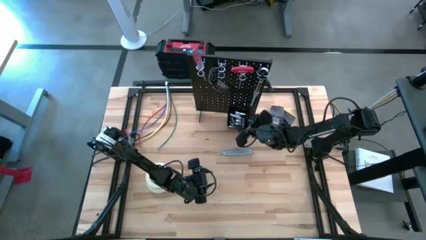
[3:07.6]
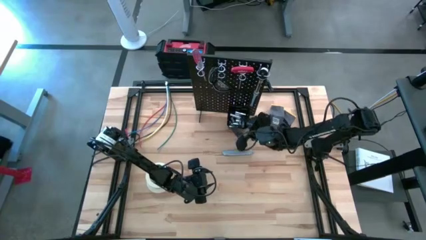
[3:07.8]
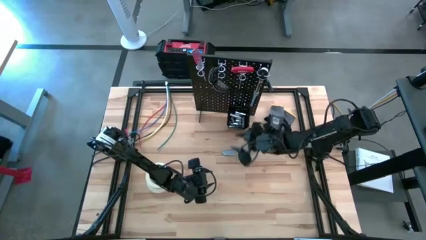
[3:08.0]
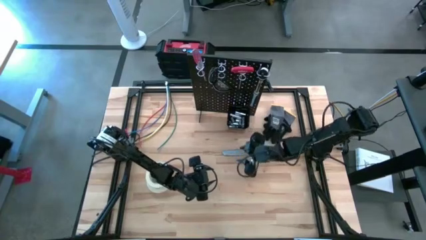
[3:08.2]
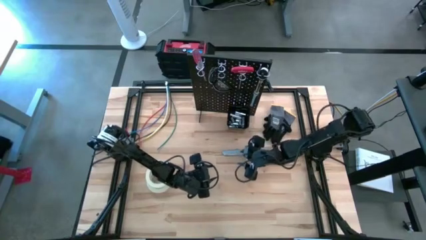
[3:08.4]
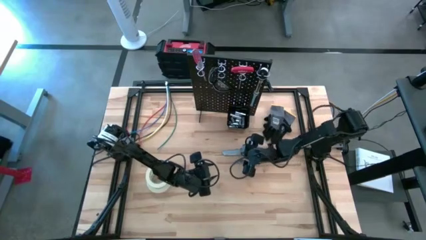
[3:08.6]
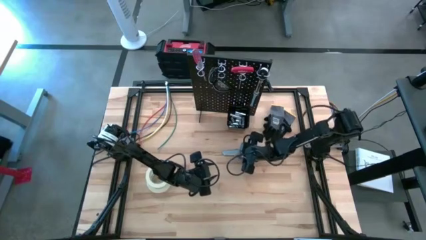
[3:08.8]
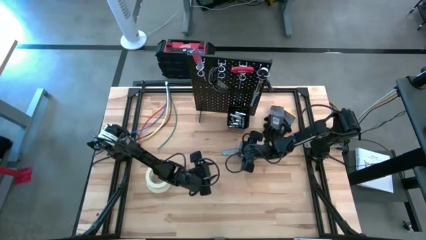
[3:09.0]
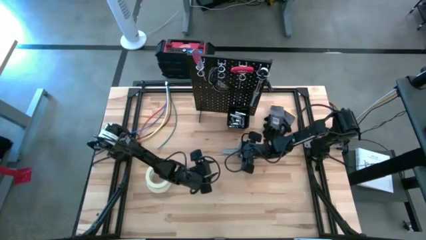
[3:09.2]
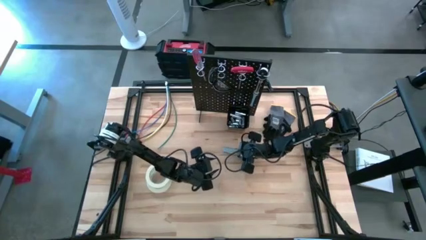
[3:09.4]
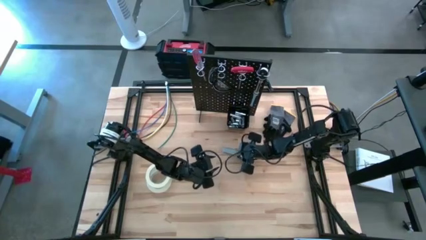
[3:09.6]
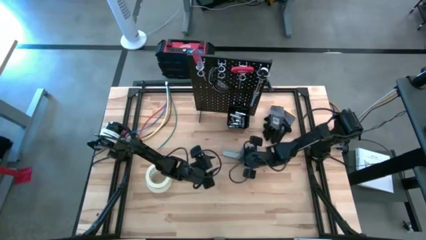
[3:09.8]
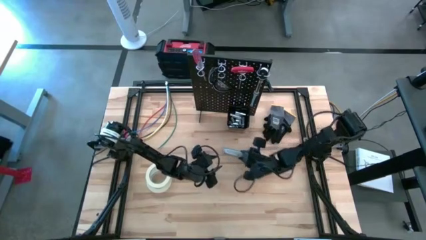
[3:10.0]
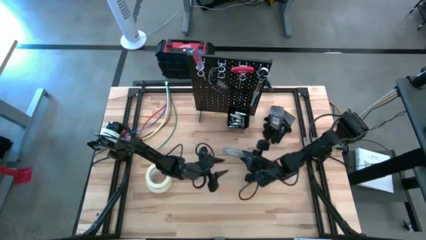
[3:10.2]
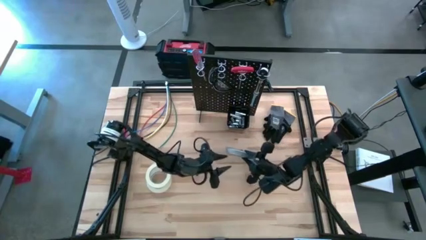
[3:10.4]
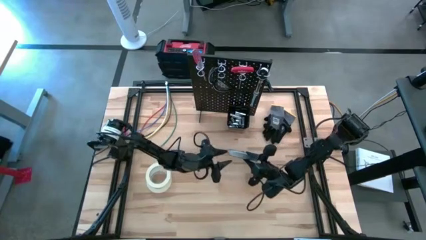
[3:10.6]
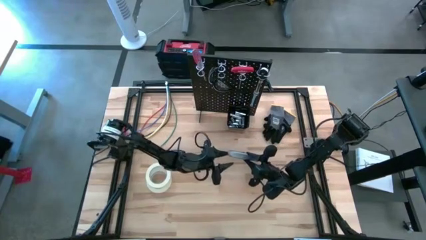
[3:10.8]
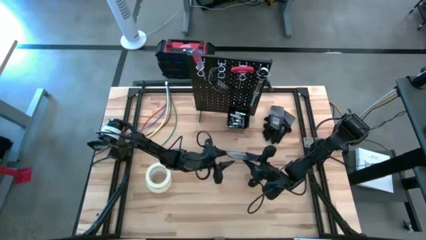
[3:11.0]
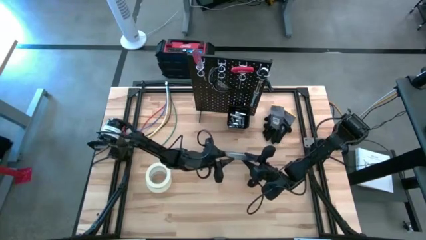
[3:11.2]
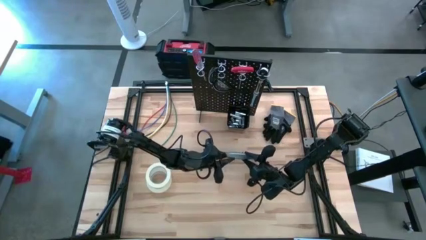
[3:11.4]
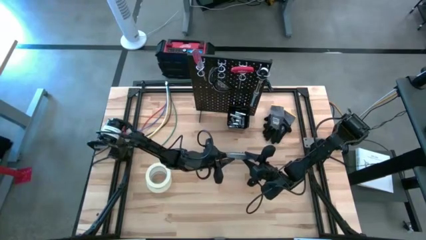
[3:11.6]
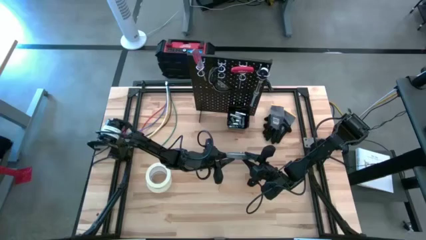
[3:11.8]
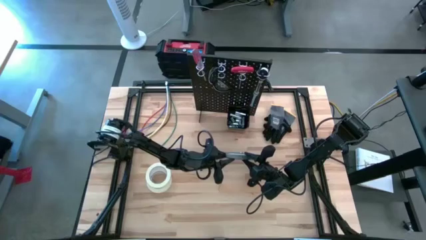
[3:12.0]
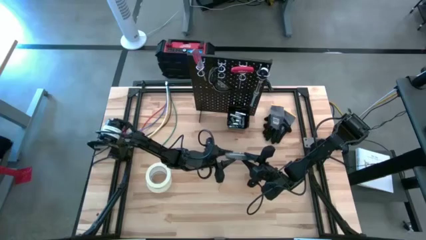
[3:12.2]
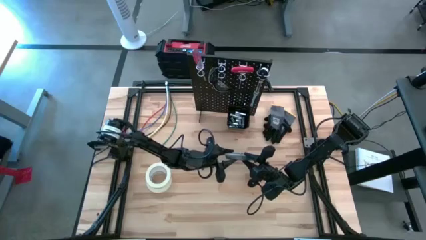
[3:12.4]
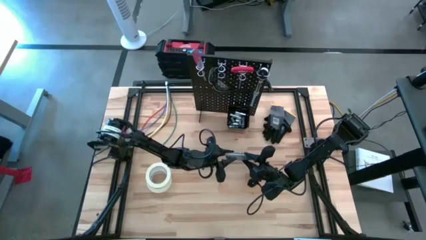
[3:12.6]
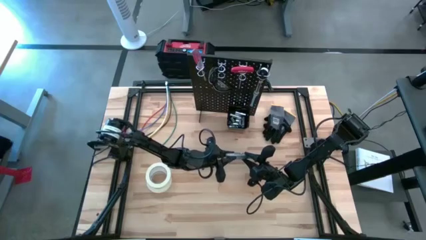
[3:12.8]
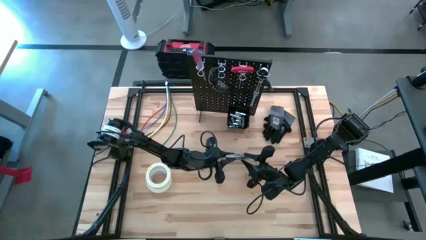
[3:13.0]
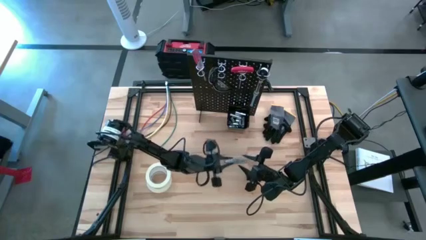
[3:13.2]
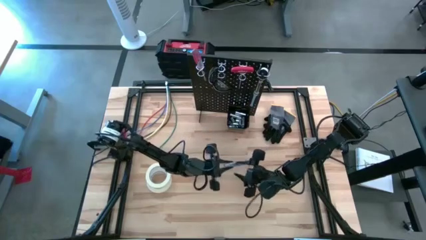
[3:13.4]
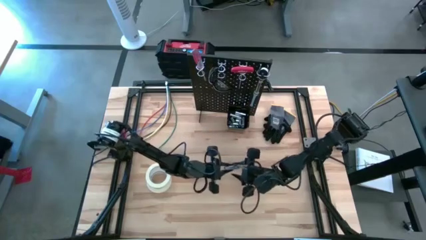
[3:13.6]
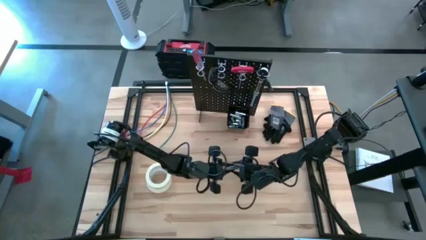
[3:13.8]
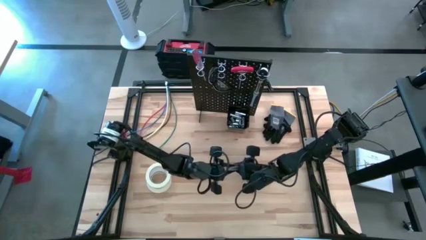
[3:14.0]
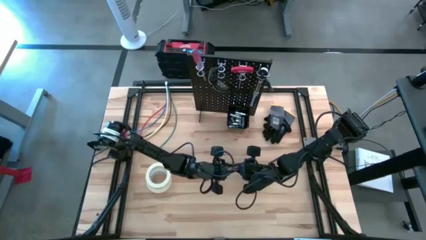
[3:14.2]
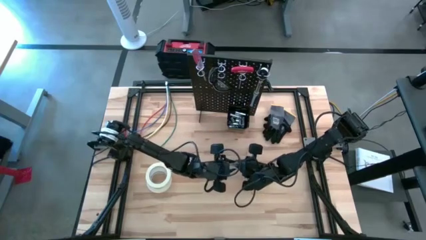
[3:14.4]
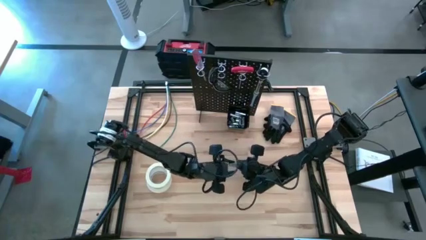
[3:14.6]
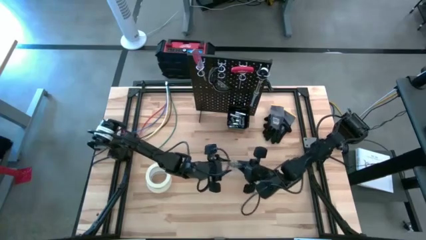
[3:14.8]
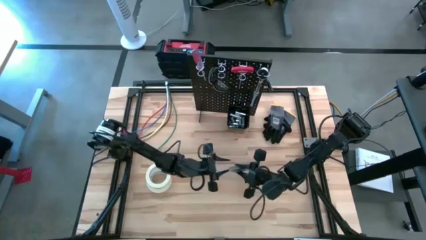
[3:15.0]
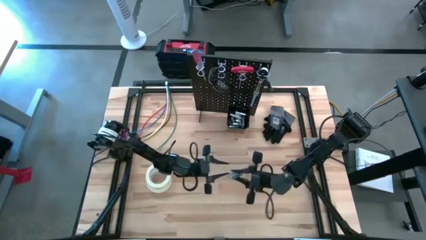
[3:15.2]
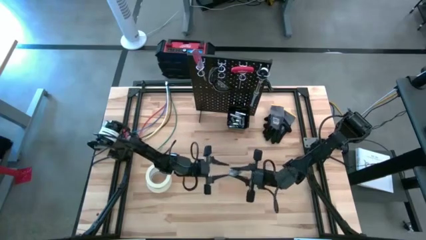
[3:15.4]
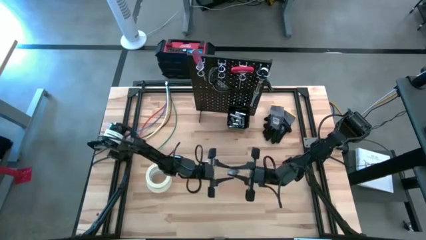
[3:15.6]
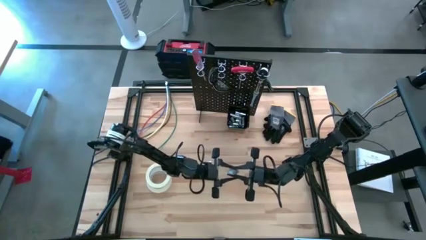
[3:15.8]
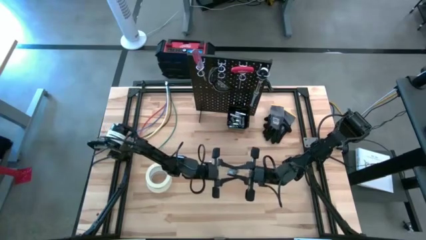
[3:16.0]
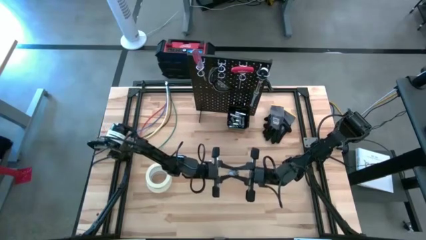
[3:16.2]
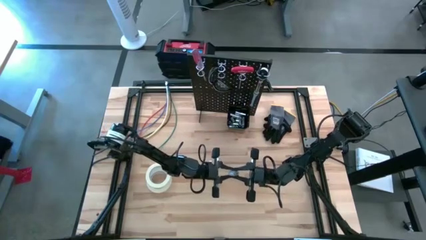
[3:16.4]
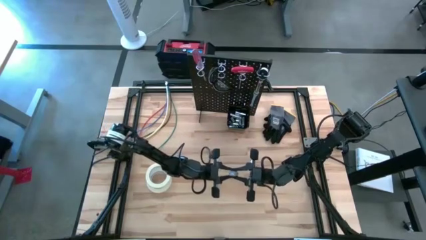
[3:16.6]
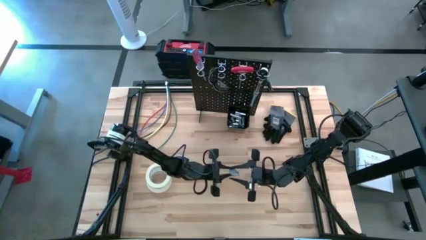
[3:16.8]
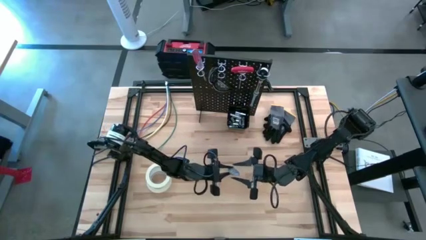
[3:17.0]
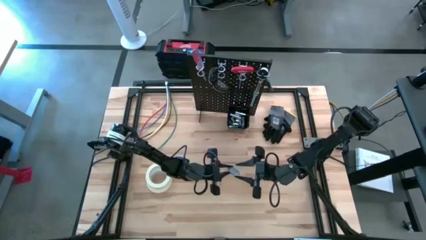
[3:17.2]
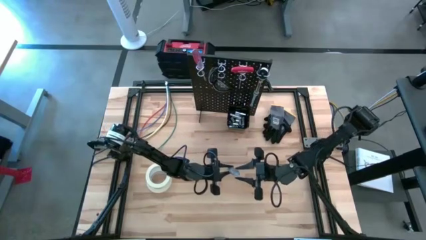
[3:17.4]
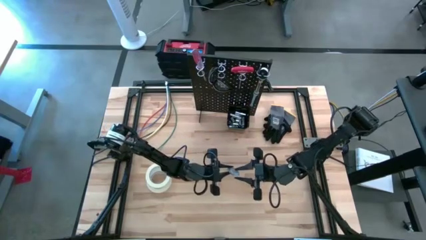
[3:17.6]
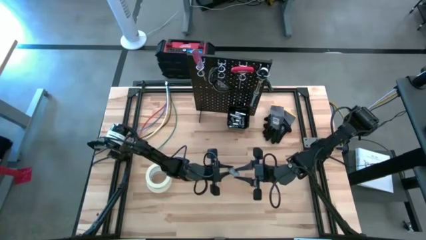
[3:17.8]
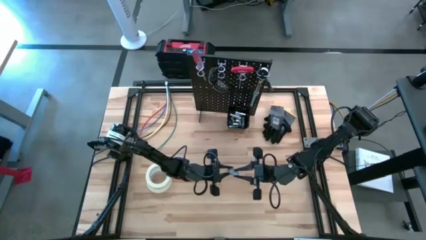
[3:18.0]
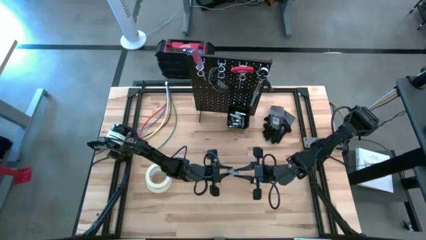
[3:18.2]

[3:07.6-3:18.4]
Task: Hang tools onto peg board
Put the cutter into the black bin on the peg board

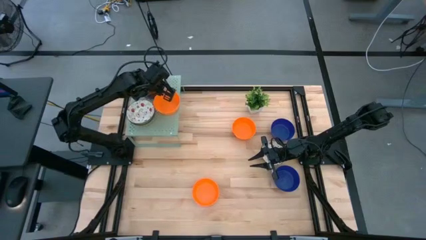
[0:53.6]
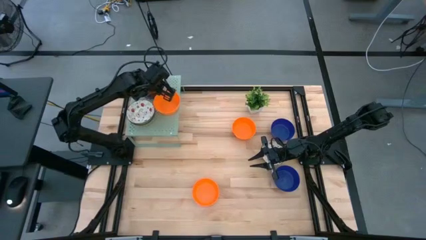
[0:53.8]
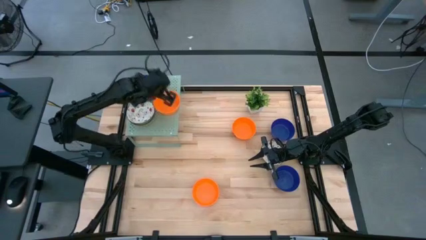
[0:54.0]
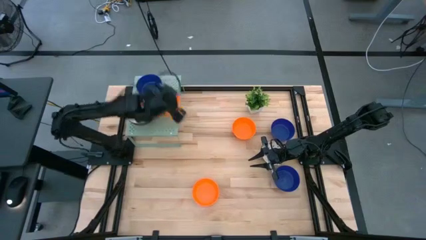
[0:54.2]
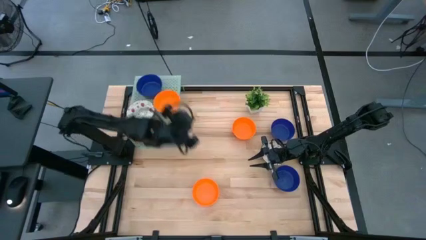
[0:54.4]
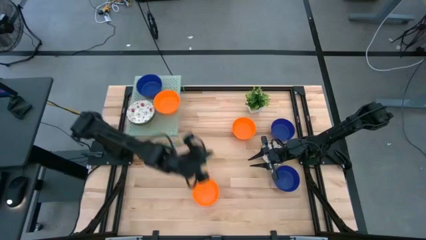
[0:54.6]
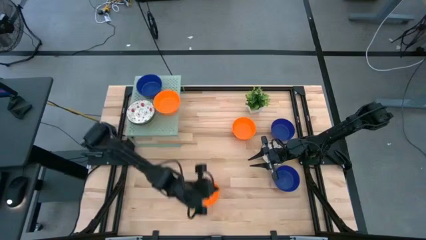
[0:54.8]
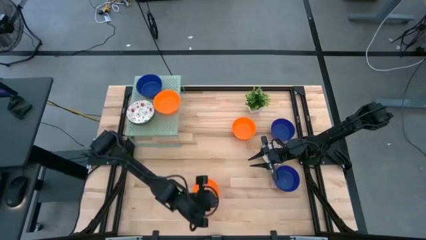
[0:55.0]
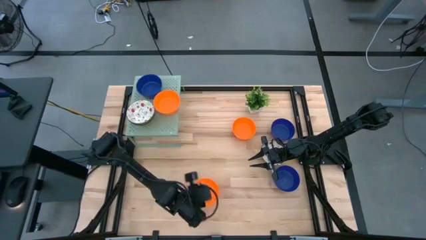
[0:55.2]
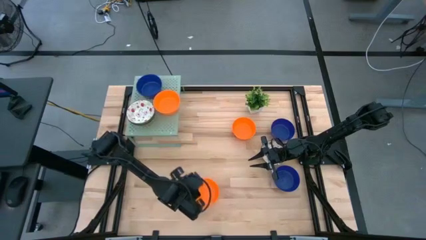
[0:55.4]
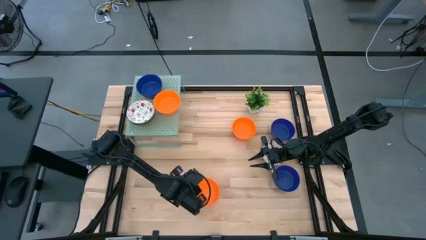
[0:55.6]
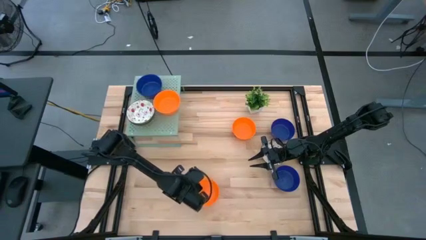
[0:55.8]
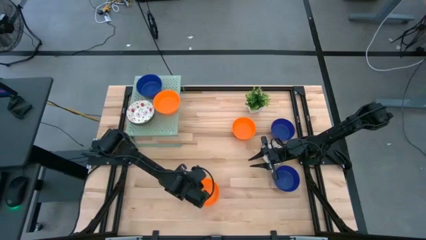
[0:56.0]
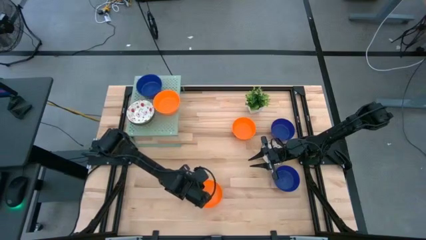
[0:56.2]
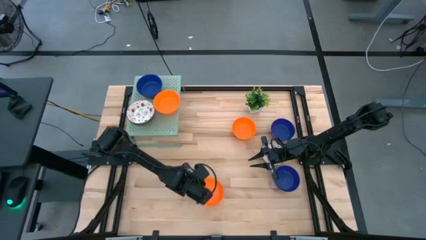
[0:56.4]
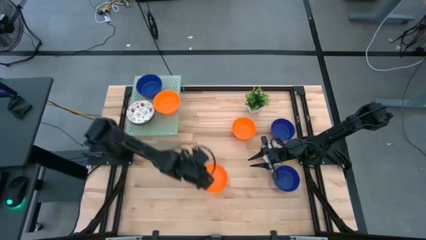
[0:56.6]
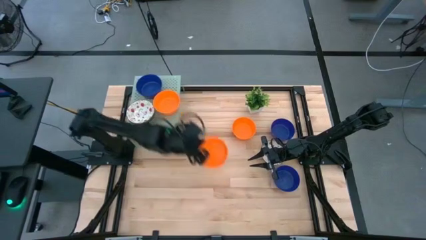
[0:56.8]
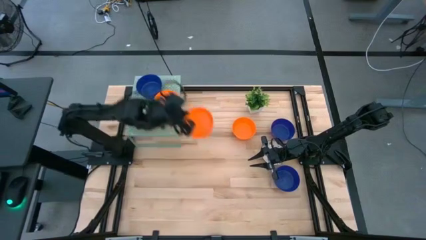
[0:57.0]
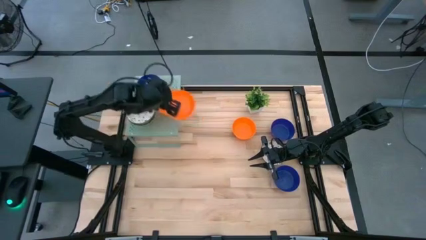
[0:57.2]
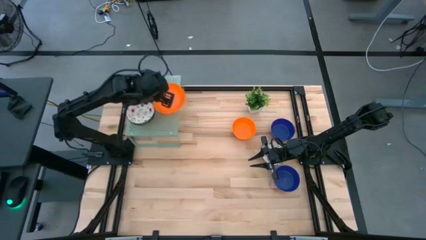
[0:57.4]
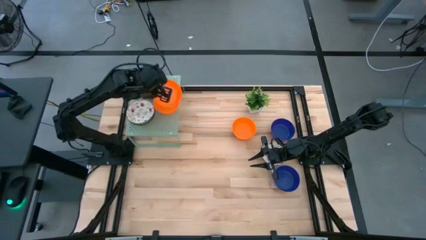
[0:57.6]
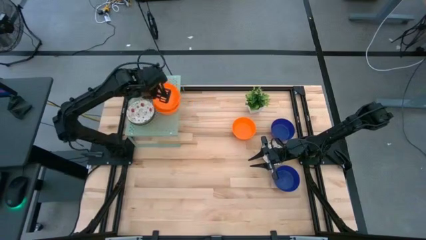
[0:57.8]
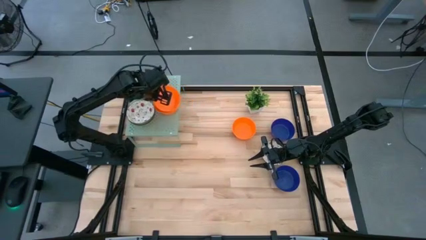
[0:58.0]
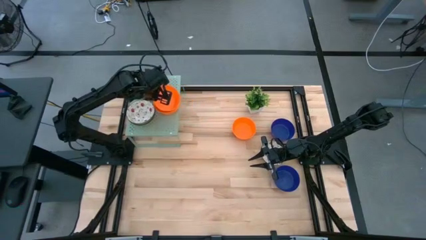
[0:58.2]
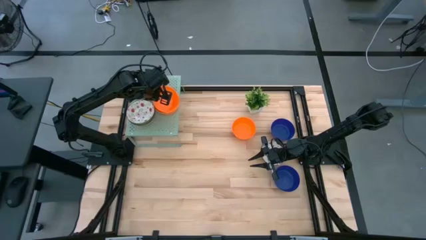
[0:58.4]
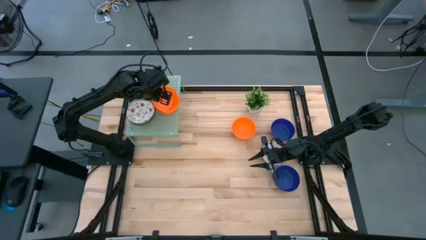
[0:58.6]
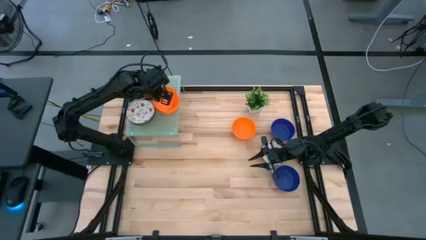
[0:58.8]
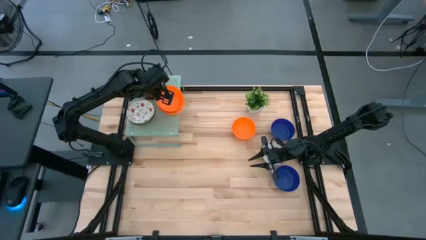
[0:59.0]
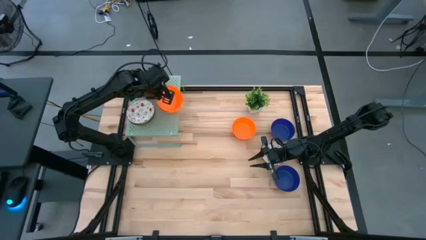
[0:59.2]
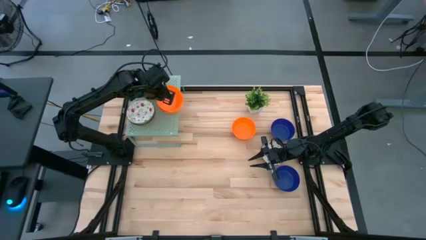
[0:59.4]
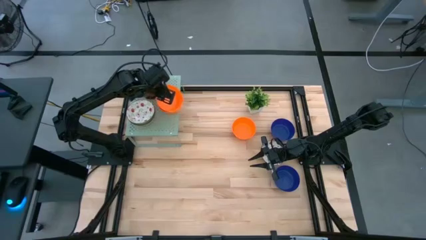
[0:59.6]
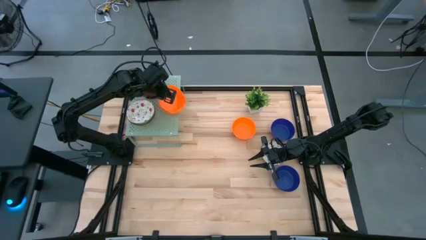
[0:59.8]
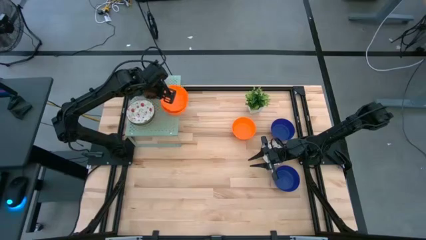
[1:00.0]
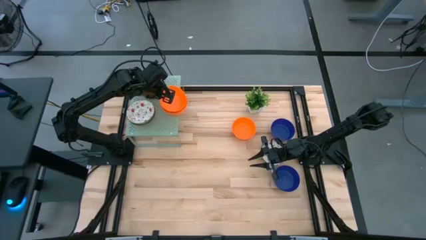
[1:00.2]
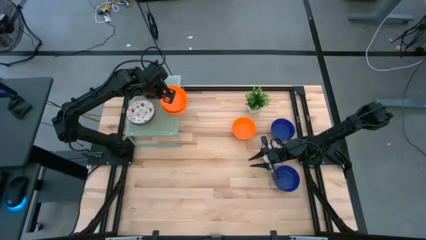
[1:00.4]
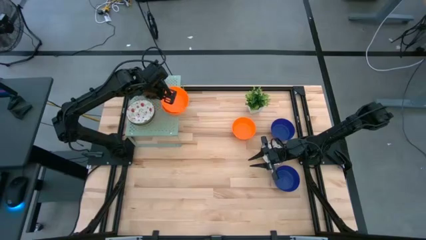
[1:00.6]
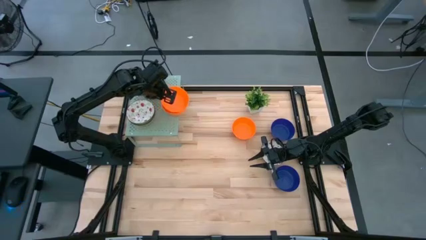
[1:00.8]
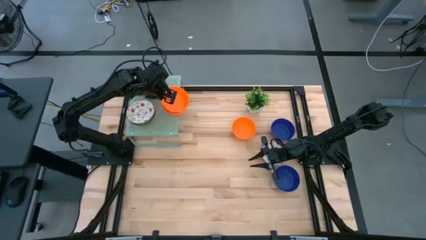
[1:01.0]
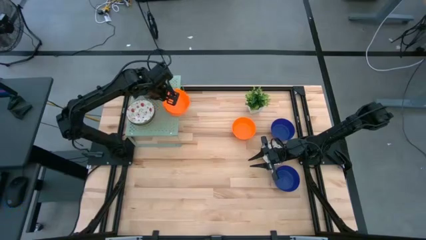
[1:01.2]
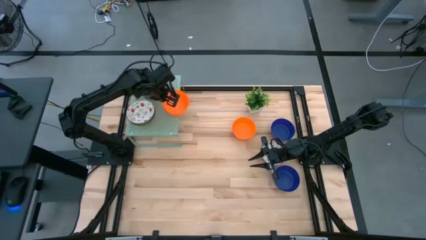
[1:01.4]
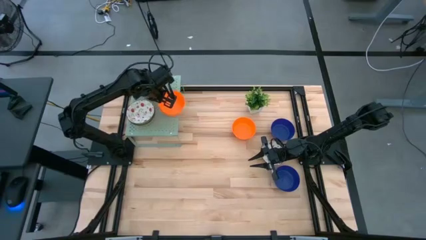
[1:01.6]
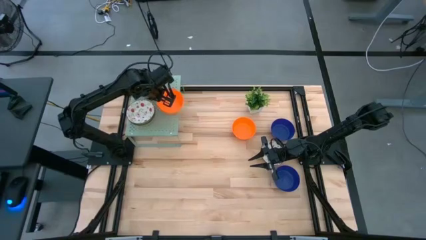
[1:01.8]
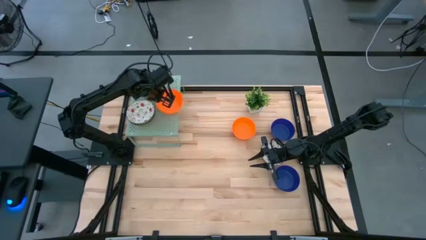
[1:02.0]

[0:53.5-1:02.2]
Task: Pick & Place Mini bowls
Stack the orange bowl on the orange bowls on the shelf
